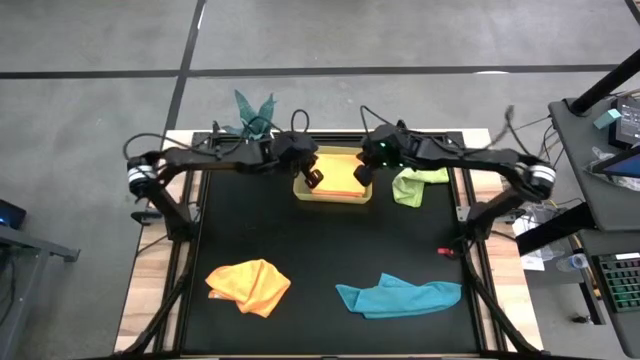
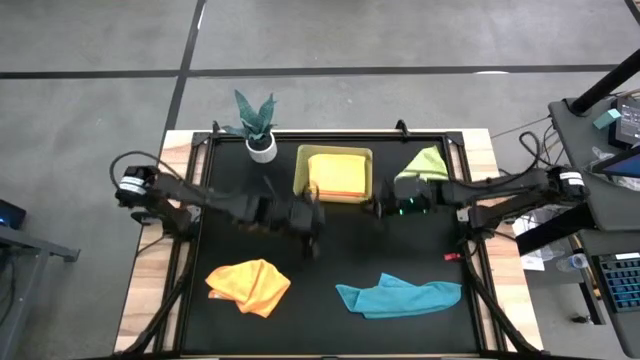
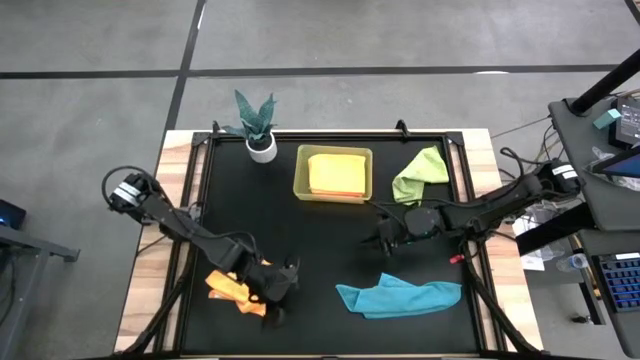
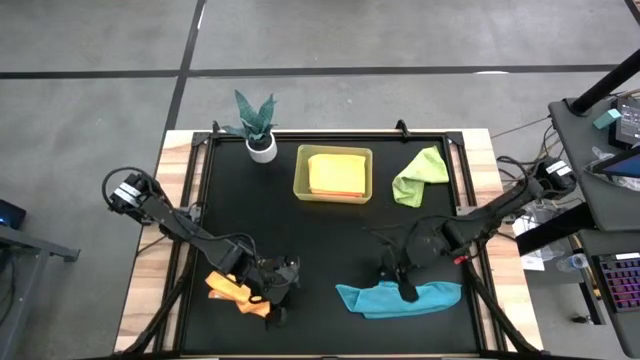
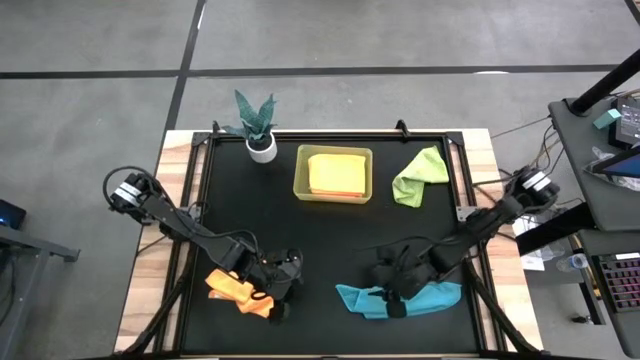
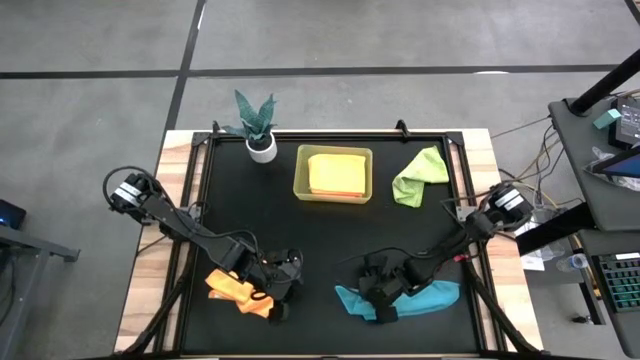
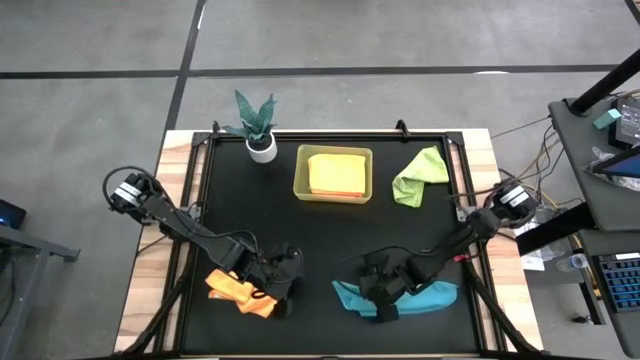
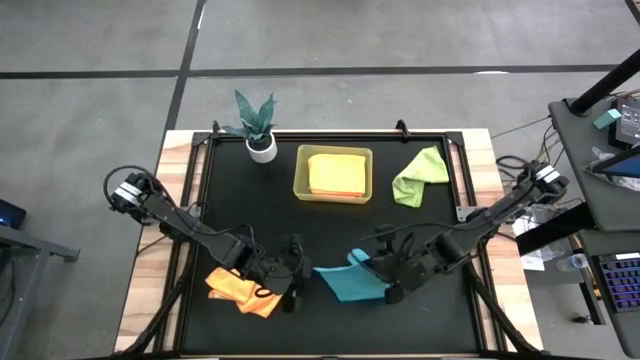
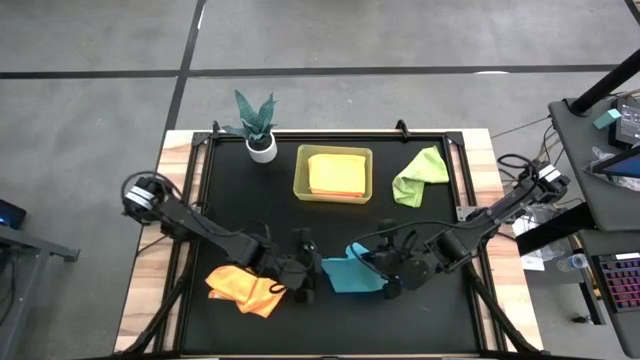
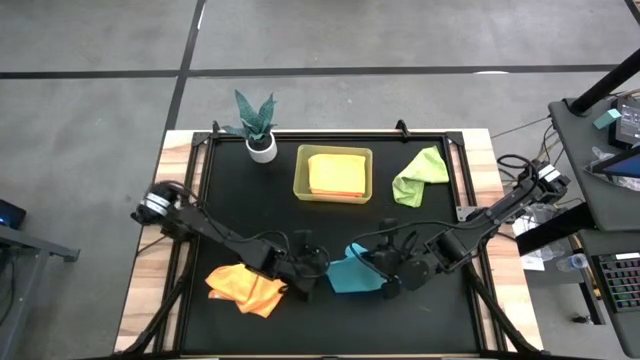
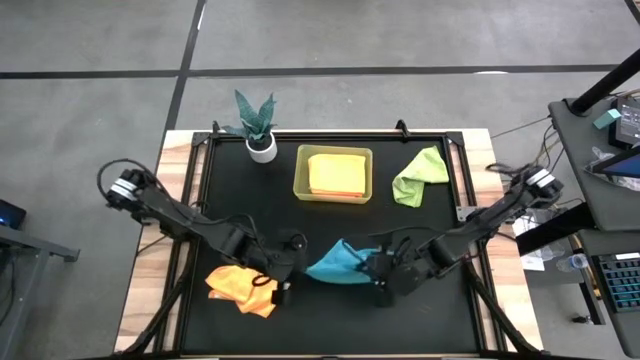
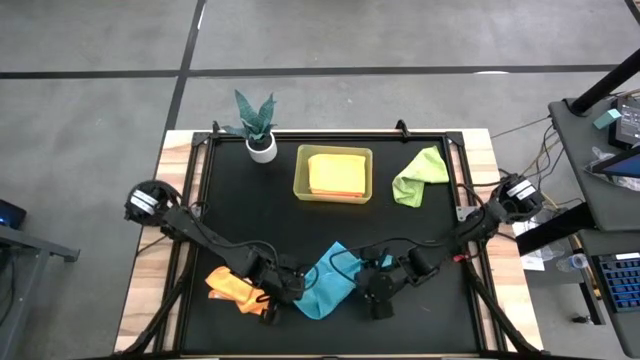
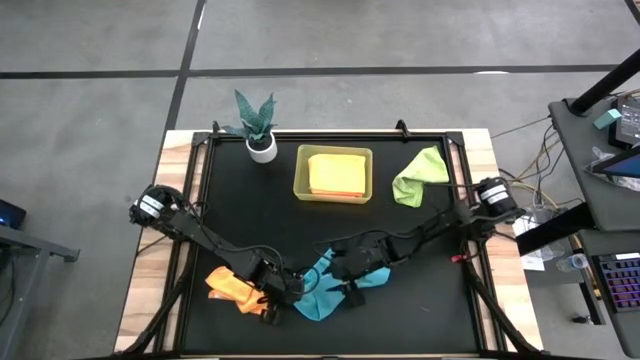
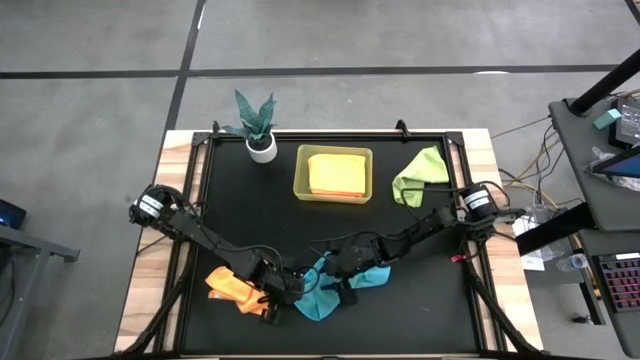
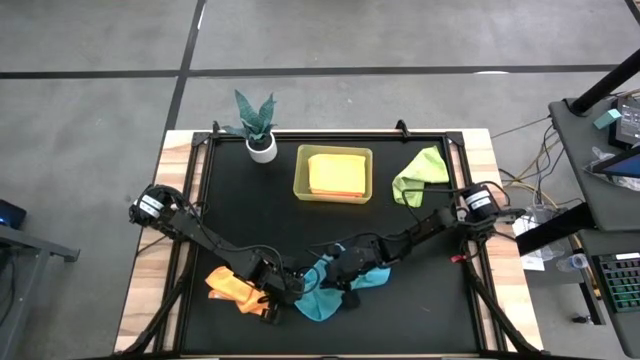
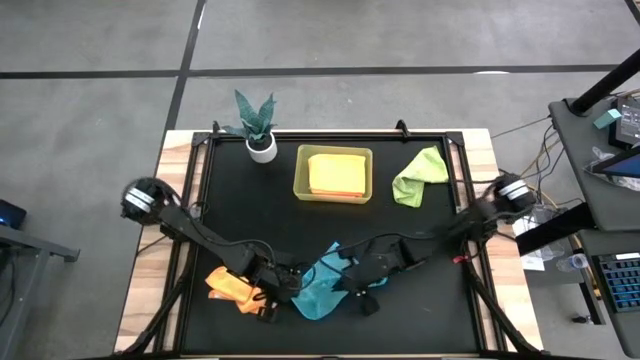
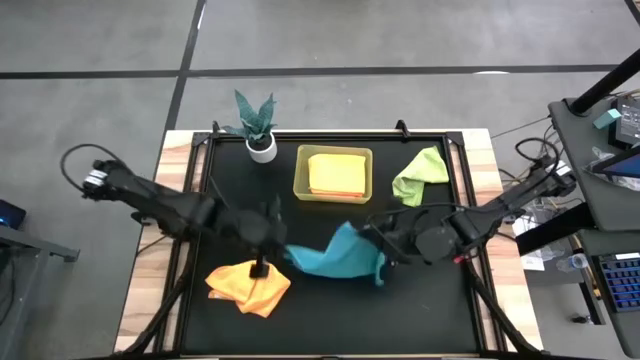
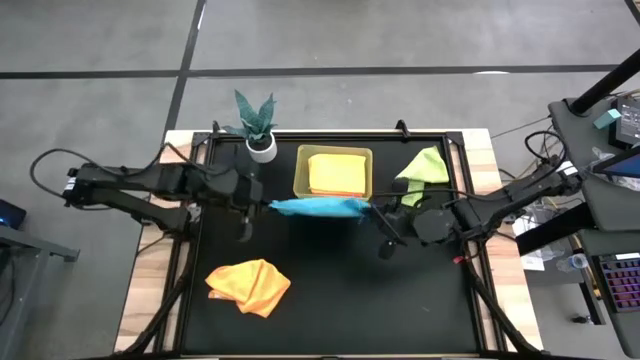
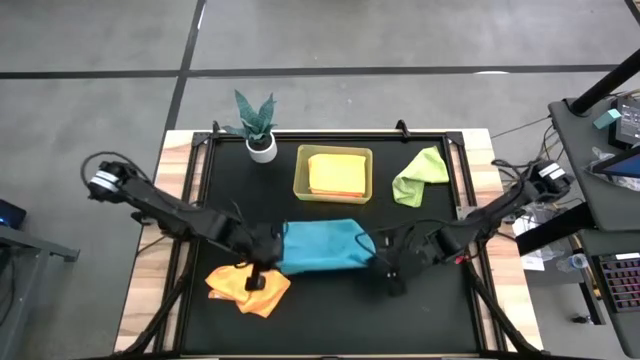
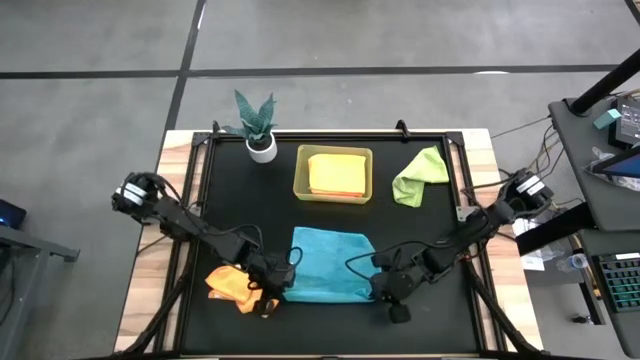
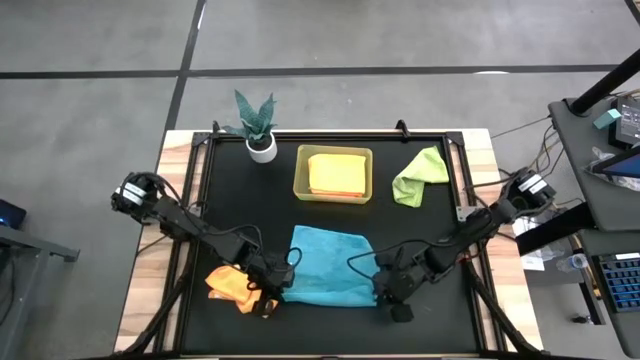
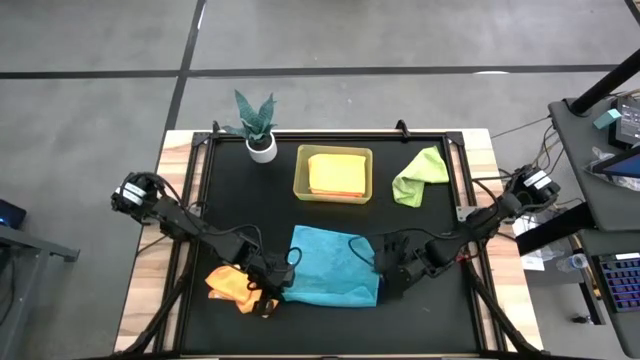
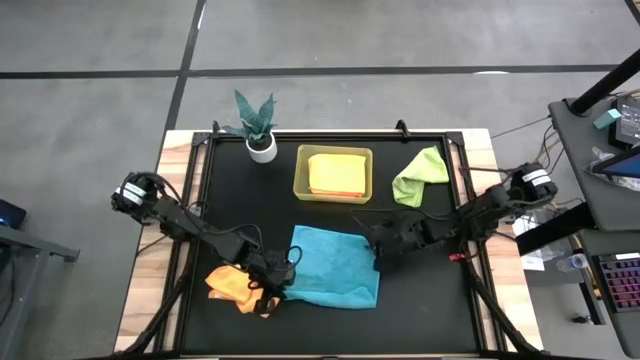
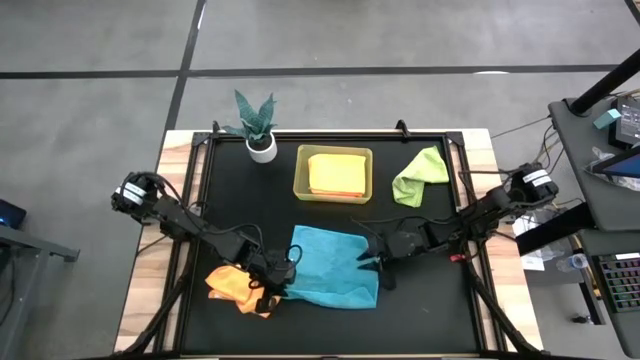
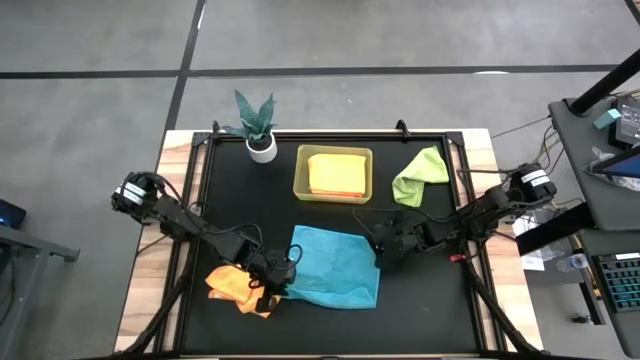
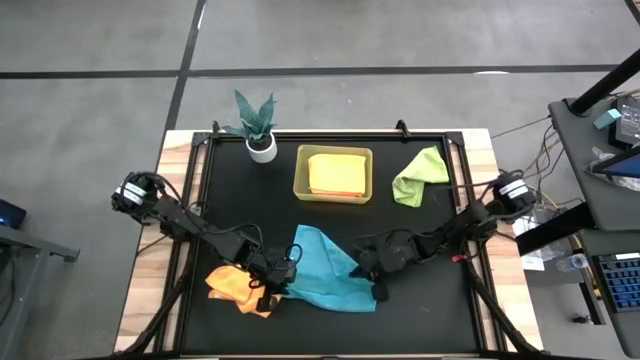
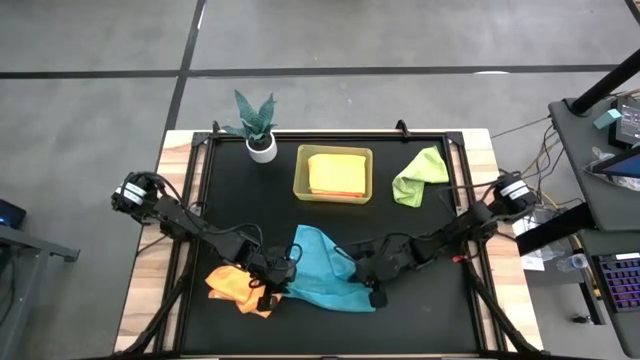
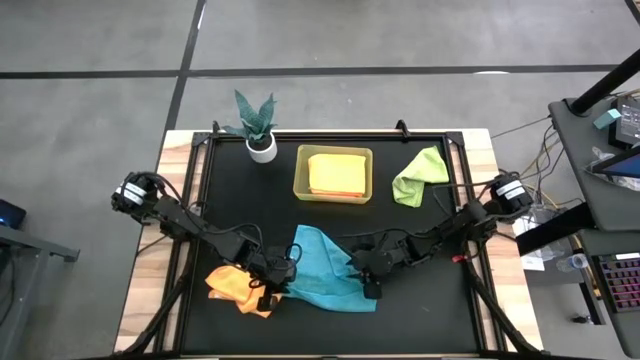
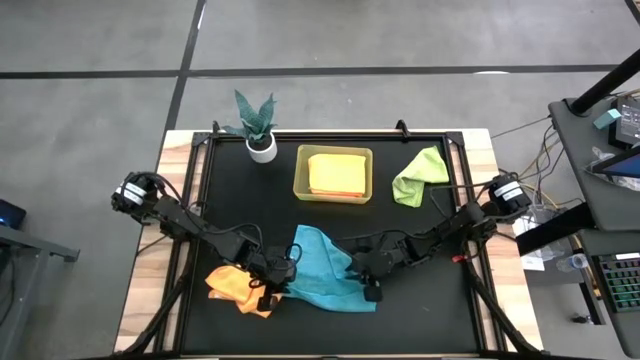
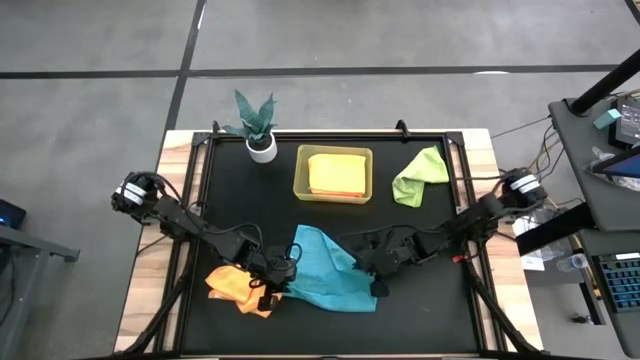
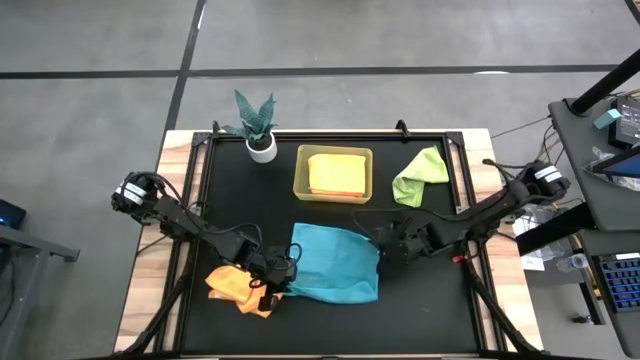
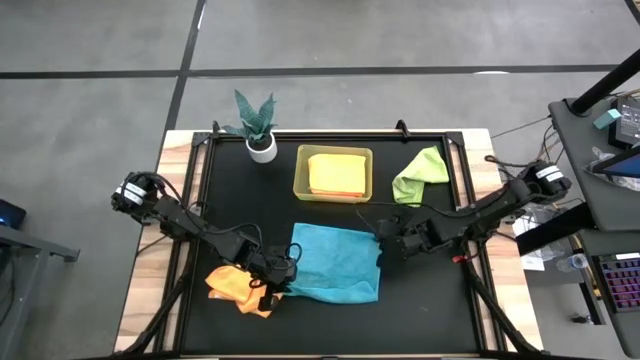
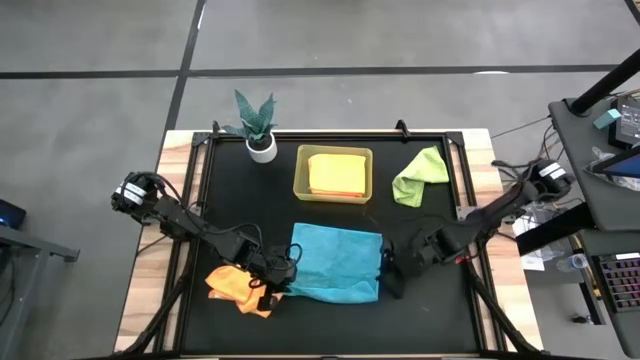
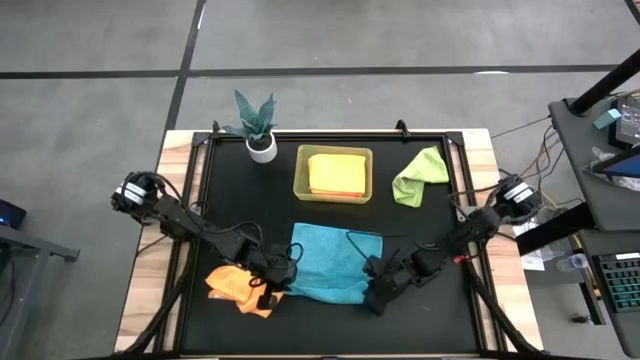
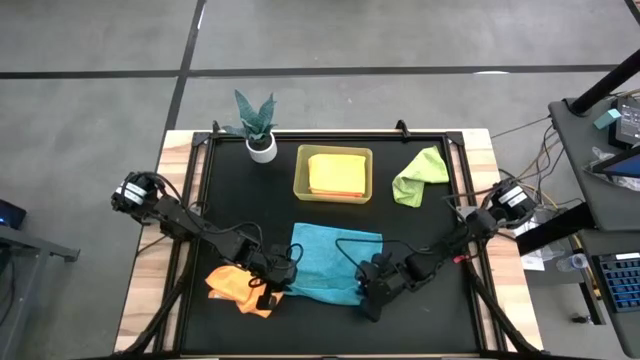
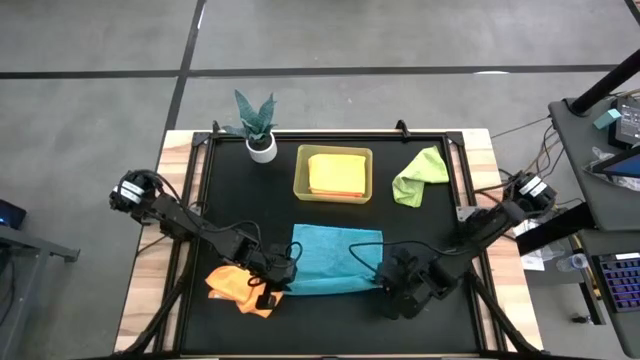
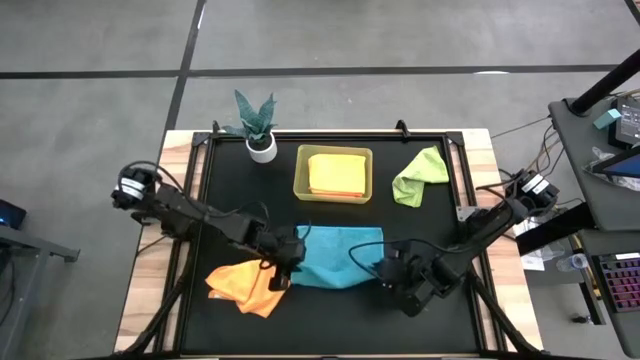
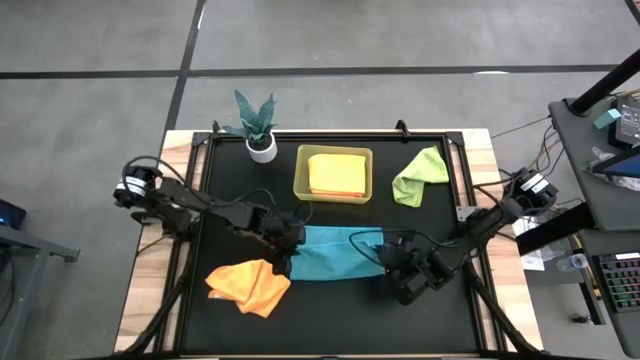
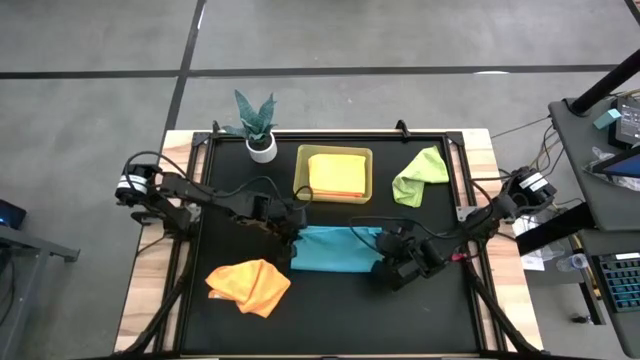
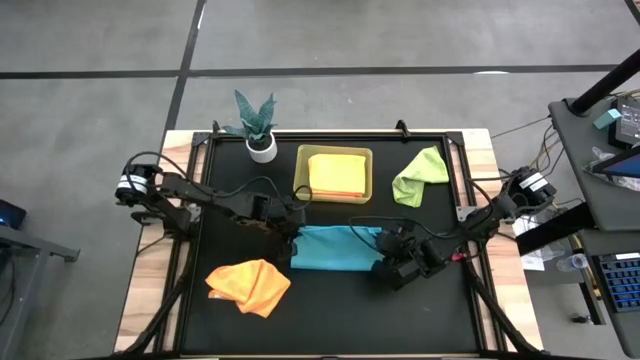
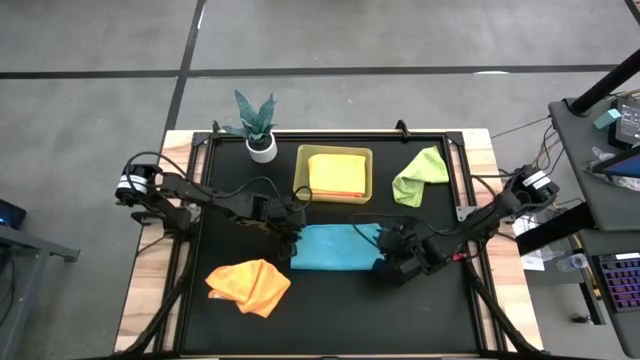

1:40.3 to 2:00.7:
Task: Fold microfiber towels
Fold the blue towel on the table
